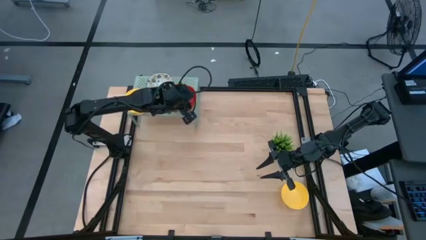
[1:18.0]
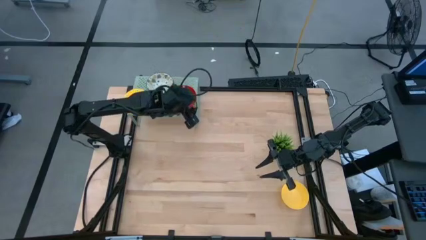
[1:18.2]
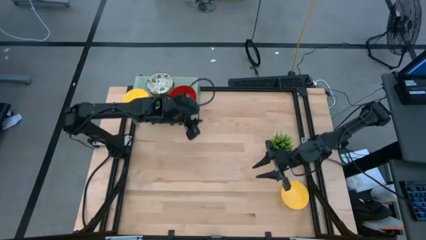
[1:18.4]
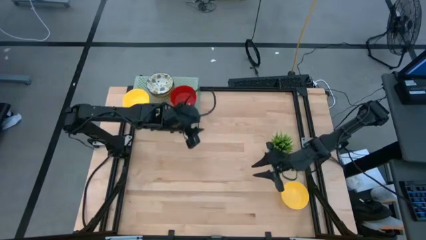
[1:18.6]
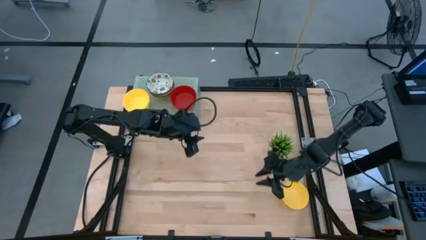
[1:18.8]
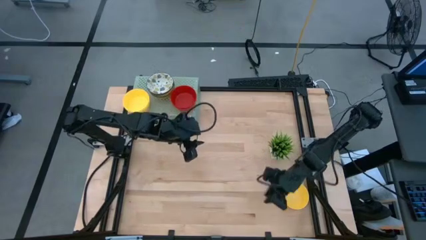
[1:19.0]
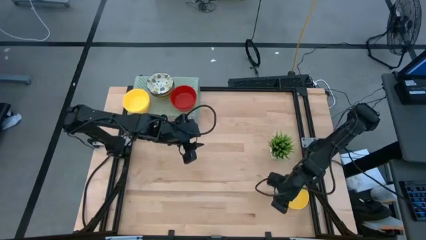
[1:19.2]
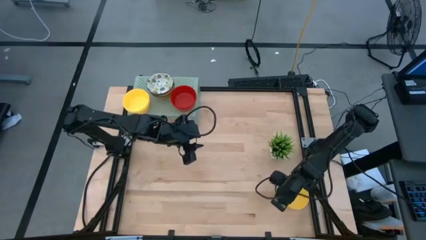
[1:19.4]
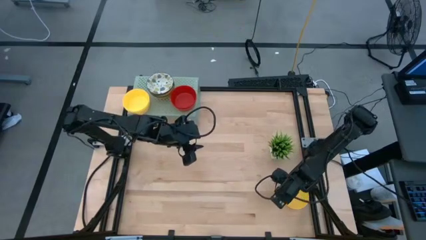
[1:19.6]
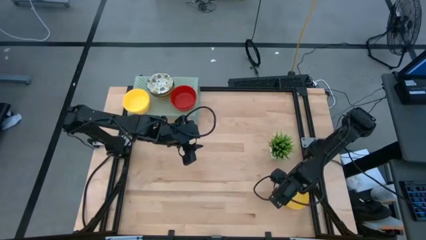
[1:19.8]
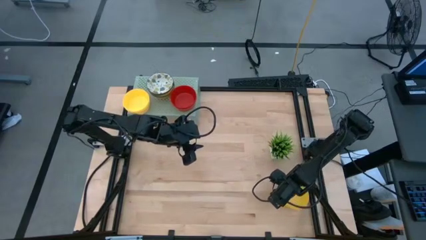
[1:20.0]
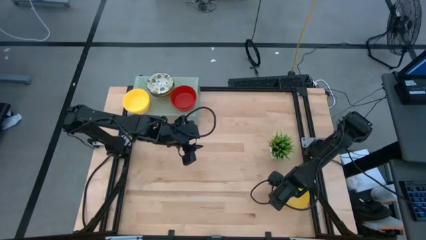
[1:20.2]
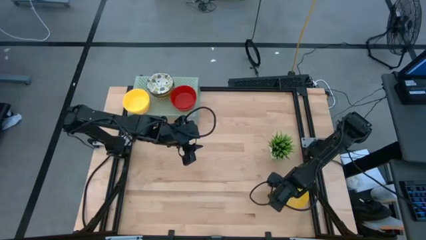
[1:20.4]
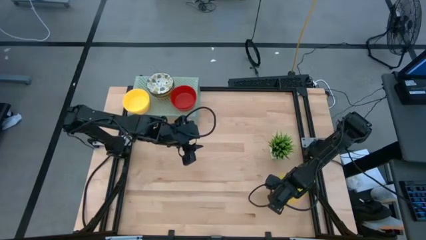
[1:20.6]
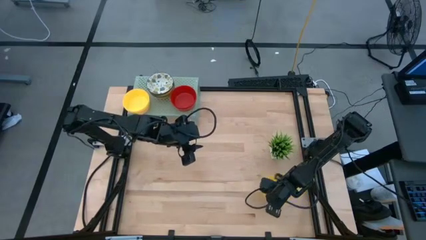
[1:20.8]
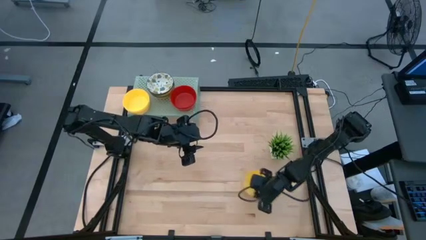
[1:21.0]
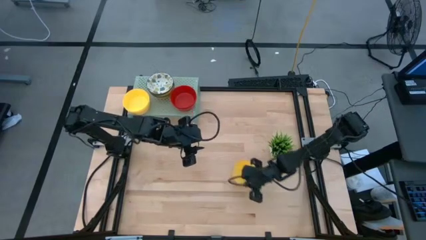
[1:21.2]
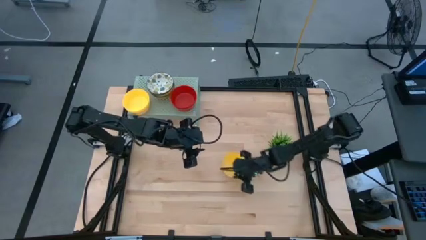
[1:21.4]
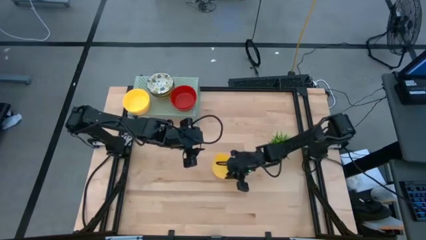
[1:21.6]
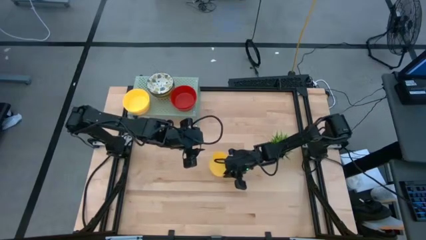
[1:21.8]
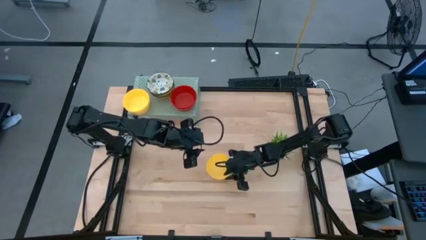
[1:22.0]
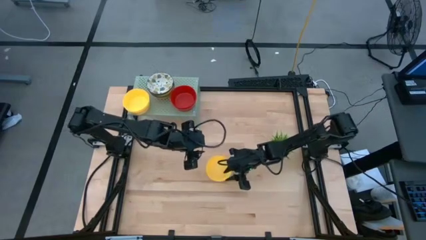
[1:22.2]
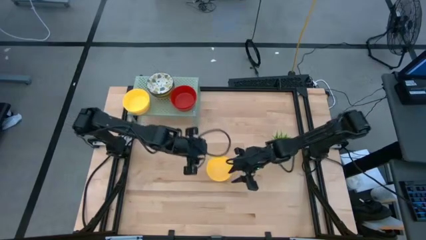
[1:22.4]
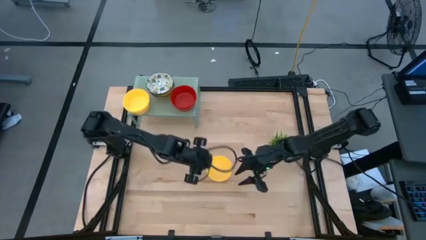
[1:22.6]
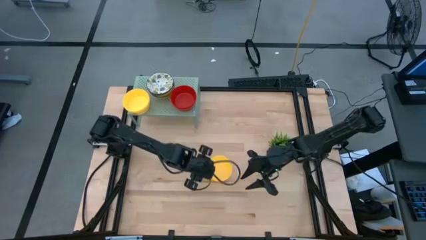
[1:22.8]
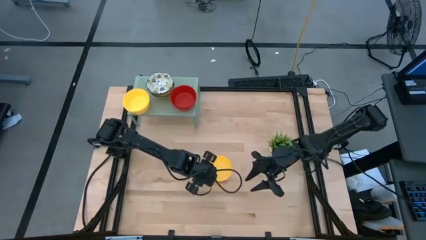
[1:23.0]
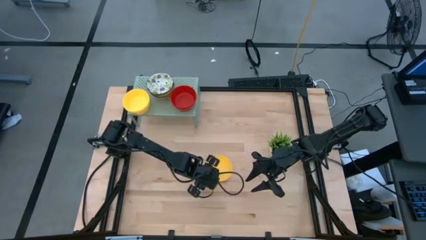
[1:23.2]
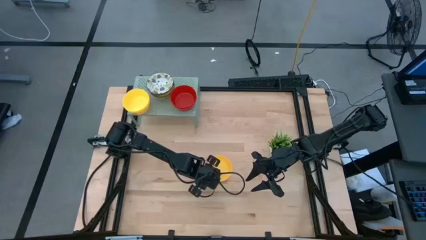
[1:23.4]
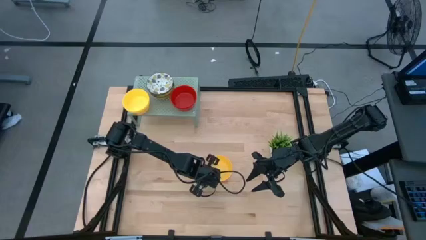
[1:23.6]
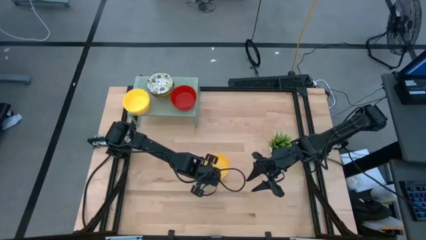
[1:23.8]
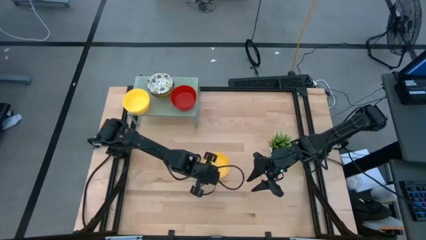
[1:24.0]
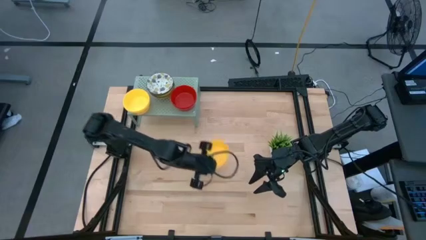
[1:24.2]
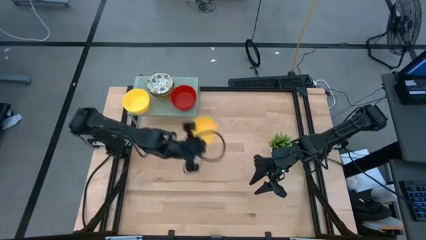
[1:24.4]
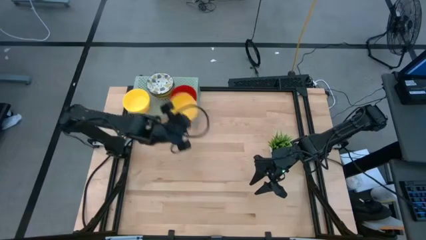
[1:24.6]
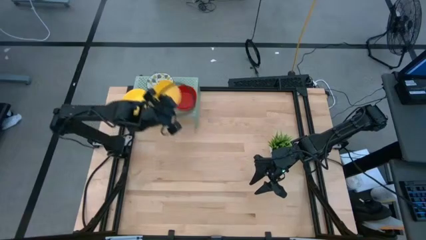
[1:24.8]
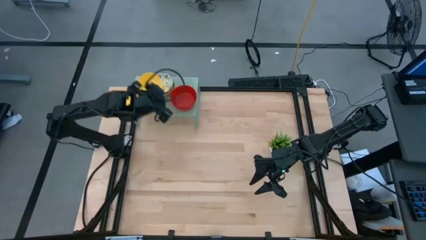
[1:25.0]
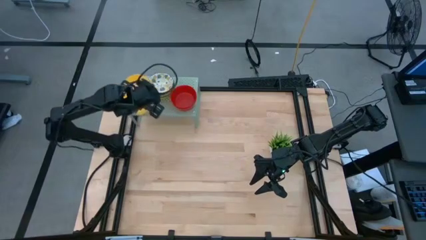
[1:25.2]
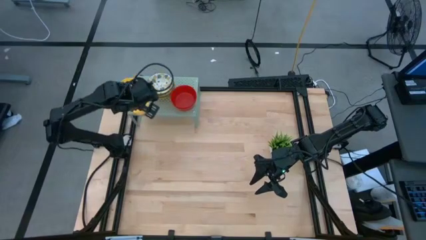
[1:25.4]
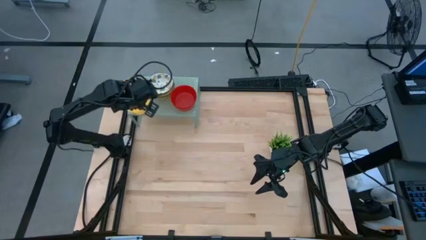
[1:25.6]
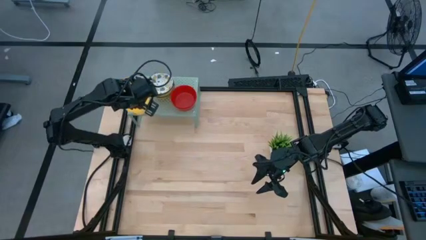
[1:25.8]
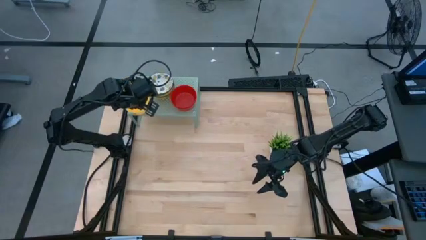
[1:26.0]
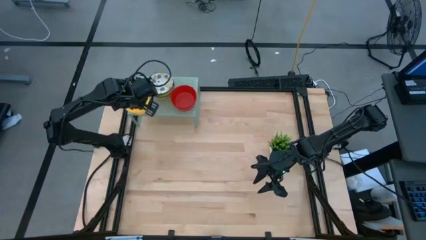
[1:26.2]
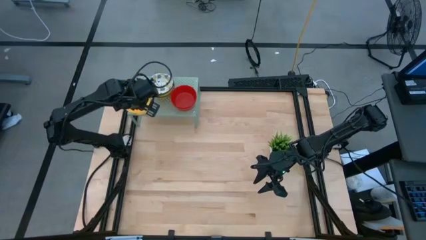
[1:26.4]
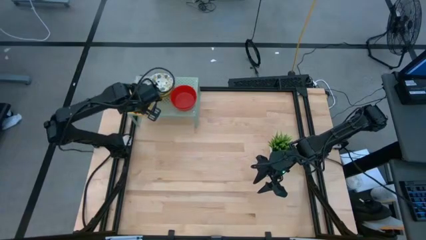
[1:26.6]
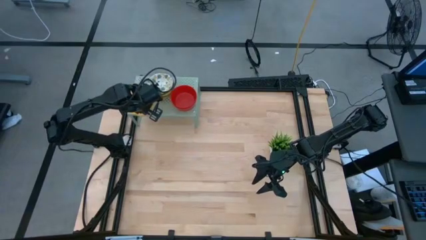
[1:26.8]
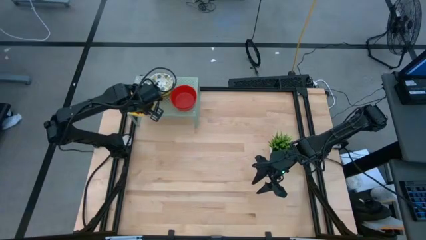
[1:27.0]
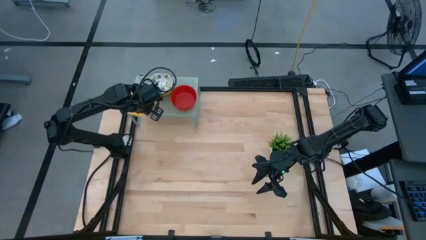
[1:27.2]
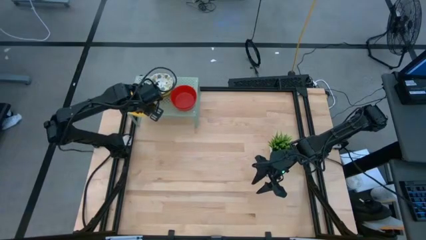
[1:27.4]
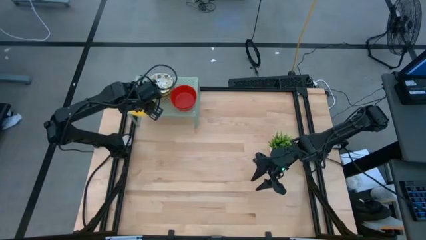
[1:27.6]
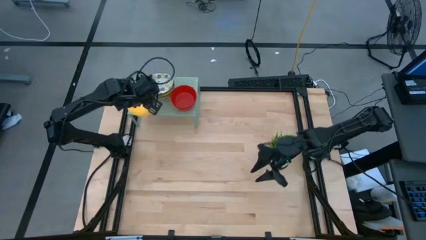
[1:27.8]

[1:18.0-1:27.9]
Task: Pick & Place Mini bowls
Stack the yellow bowl on the yellow bowl on the shelf

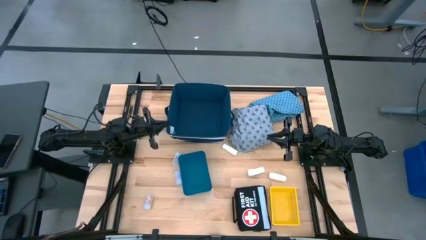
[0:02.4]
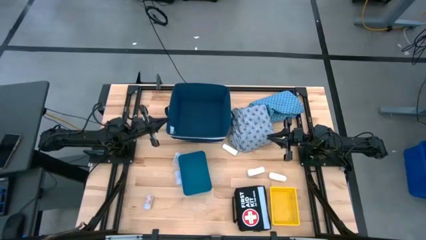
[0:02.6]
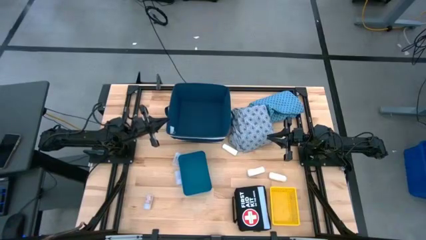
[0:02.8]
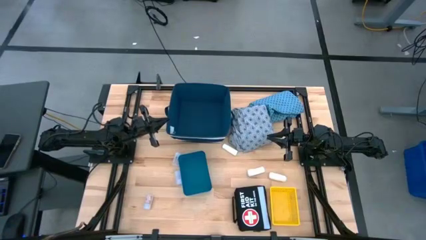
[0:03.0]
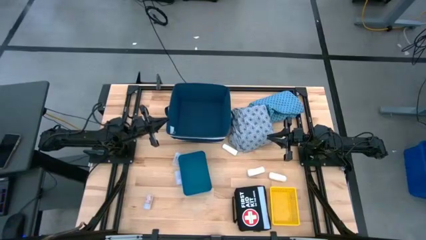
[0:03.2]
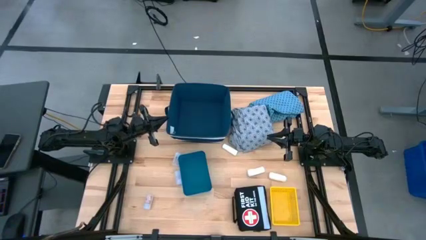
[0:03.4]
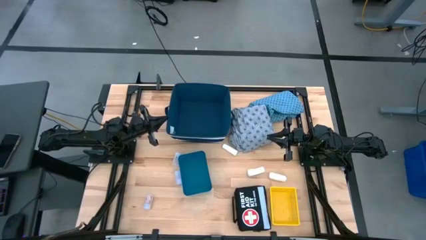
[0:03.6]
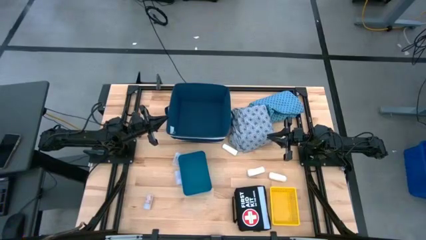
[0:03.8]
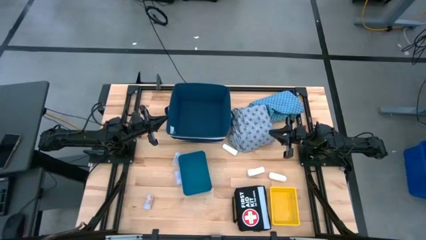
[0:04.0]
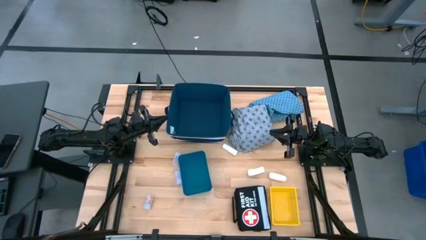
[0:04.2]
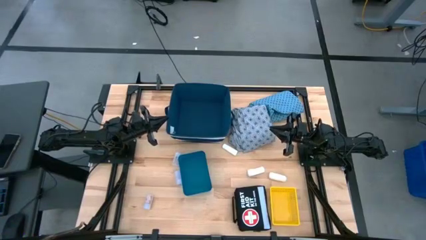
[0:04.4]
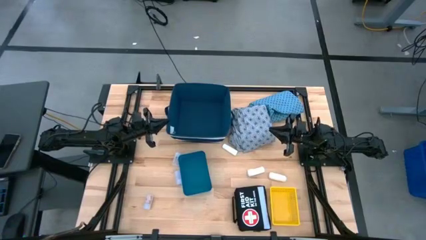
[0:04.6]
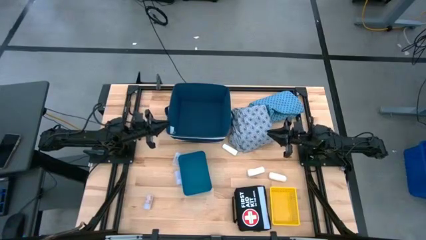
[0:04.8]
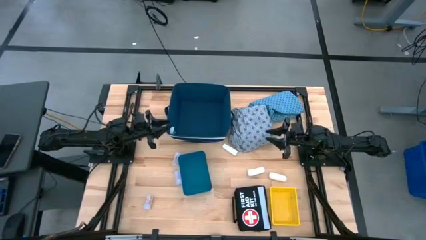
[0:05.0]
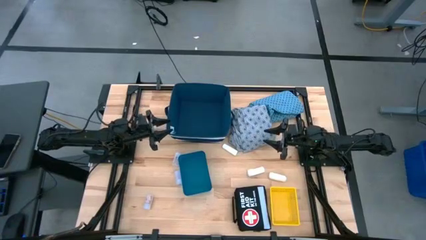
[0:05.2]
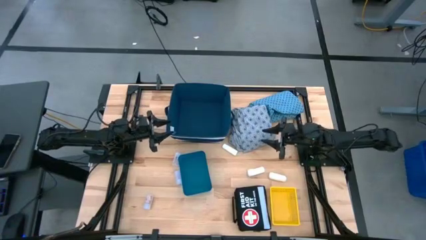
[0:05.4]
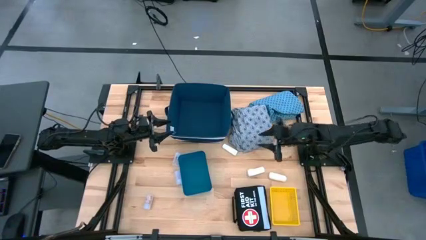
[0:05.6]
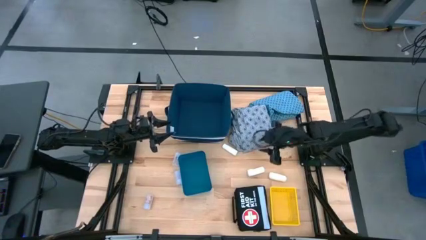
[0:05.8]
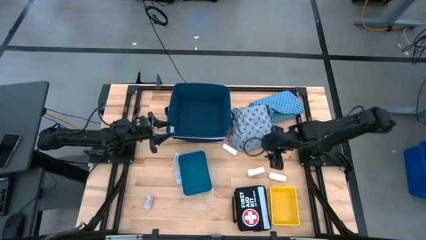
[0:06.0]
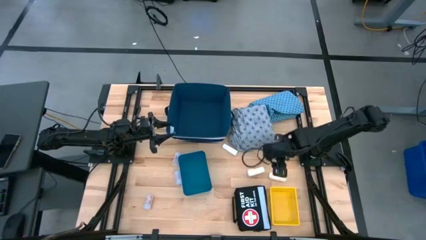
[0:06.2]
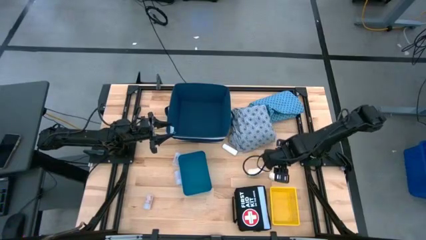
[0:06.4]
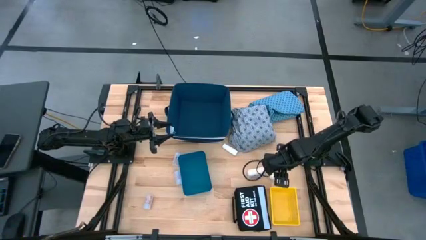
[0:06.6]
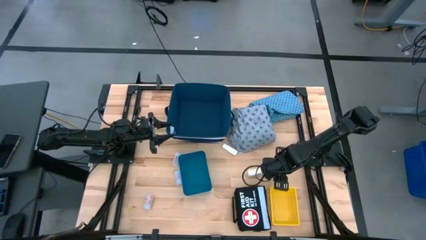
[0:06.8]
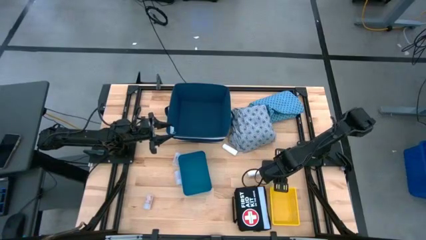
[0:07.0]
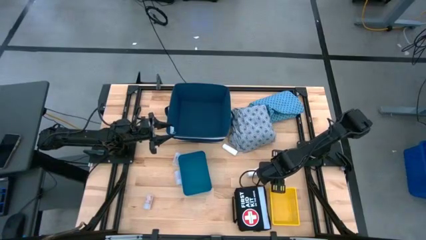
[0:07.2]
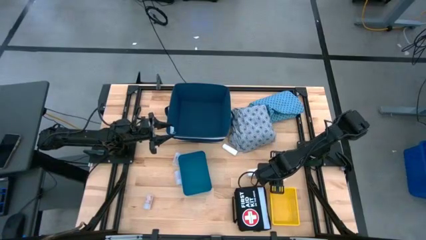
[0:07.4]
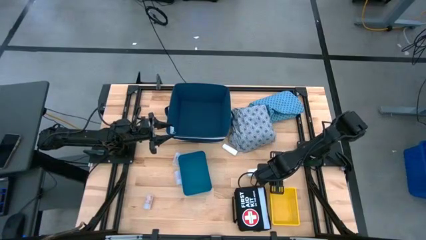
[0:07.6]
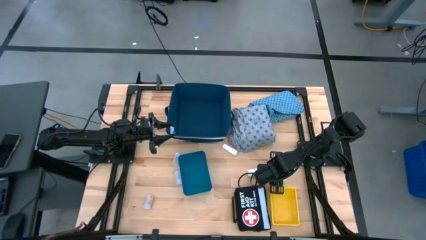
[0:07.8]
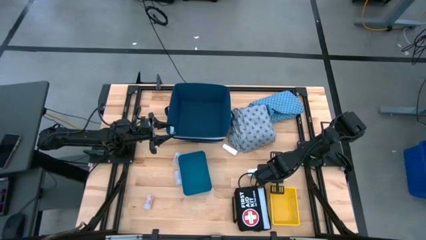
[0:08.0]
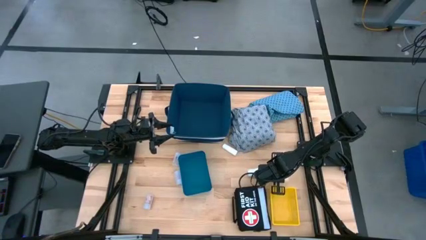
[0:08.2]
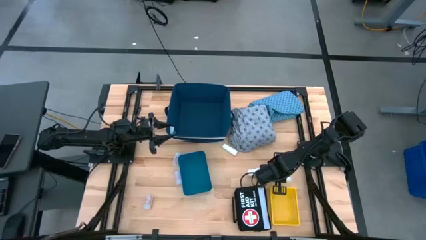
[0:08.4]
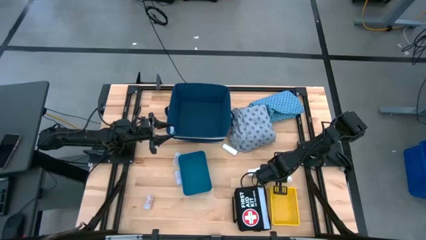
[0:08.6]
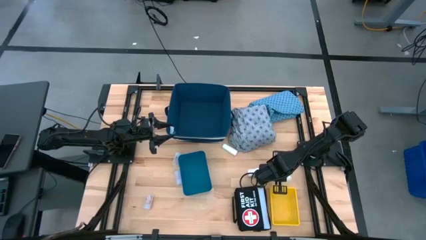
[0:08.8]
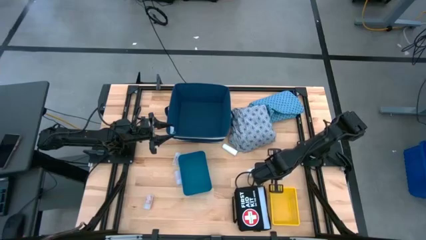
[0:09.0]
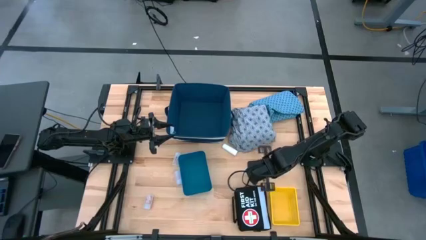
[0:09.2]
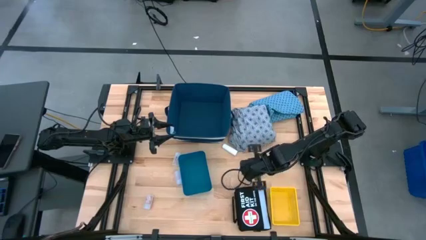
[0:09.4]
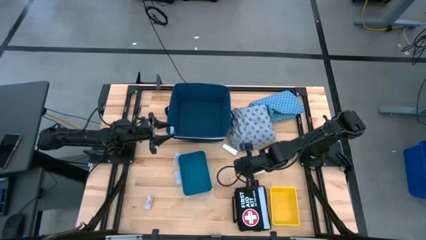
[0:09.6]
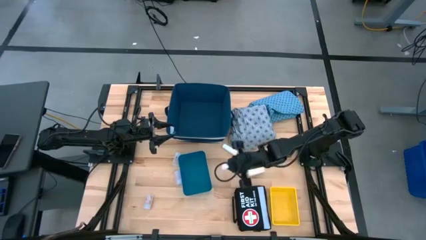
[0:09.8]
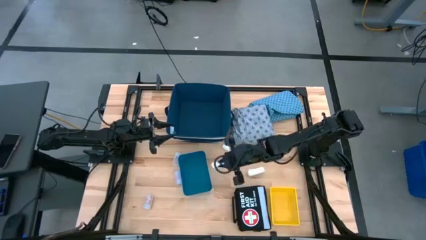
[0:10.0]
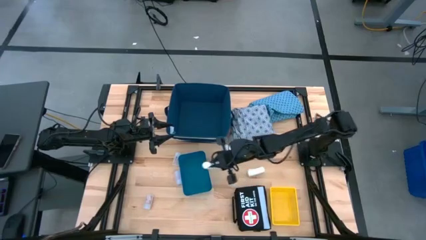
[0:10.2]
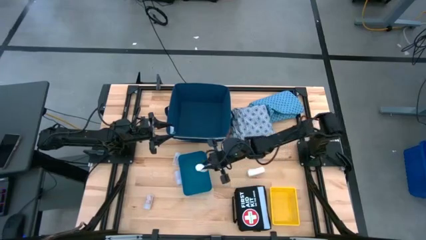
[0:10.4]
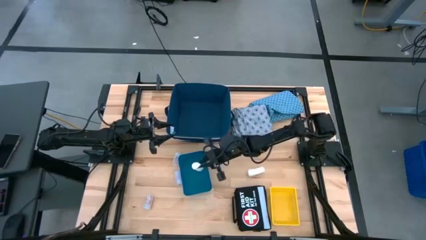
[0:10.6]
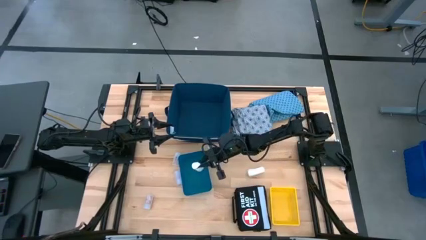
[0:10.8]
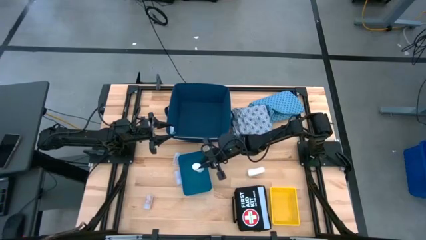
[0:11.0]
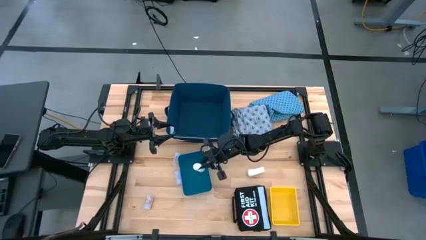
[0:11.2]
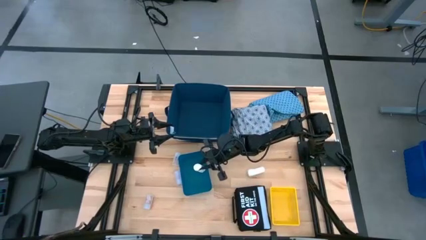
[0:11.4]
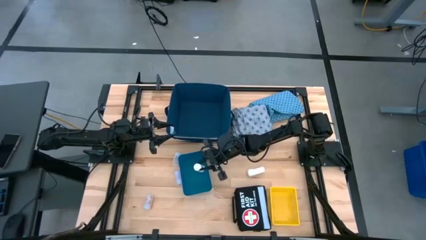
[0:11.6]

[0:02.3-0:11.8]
Task: Pick & place medical supplies in basket/bin
Put the right white gauze in the blue bin
